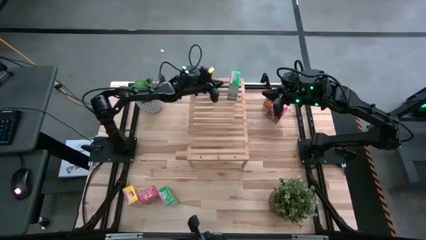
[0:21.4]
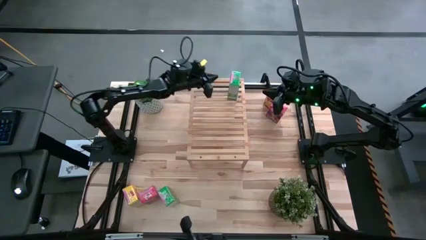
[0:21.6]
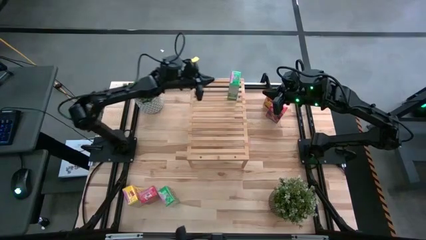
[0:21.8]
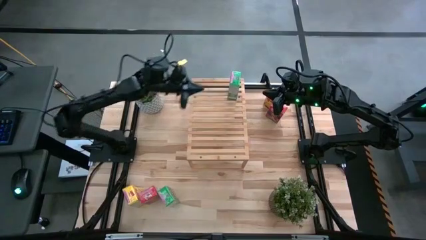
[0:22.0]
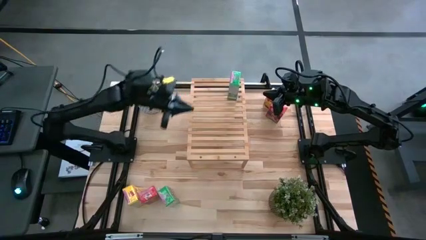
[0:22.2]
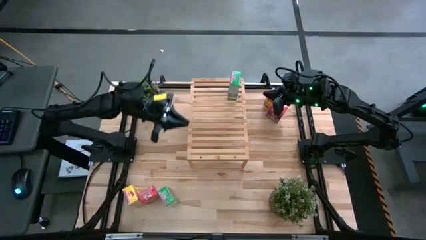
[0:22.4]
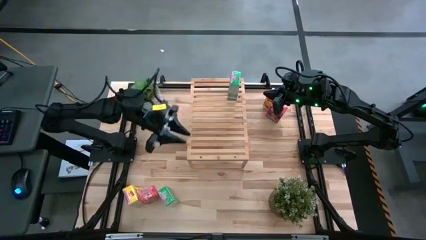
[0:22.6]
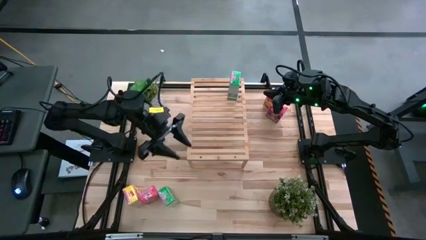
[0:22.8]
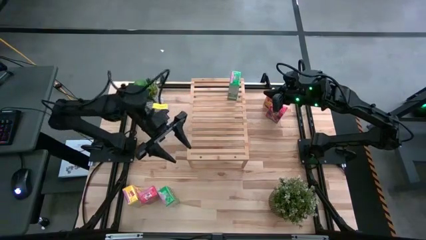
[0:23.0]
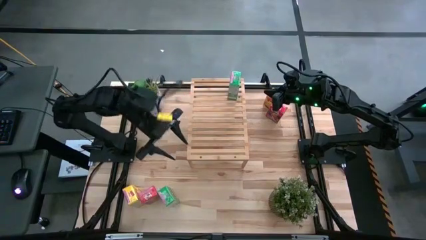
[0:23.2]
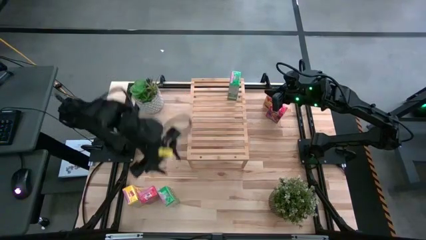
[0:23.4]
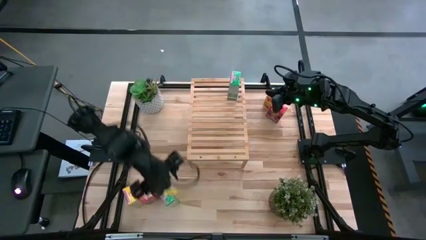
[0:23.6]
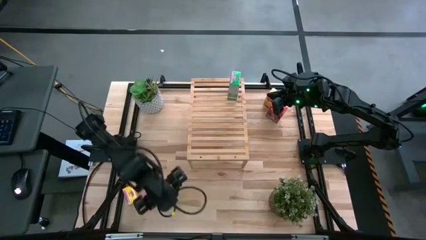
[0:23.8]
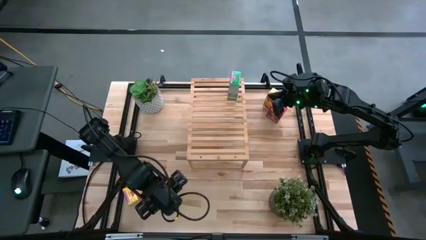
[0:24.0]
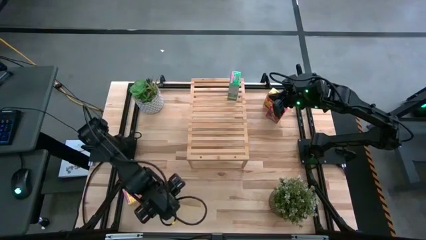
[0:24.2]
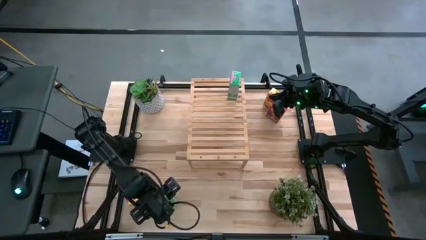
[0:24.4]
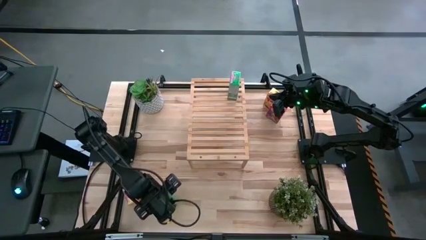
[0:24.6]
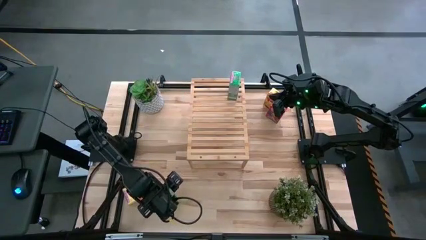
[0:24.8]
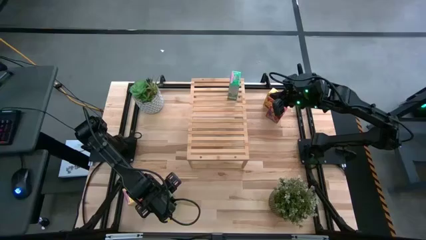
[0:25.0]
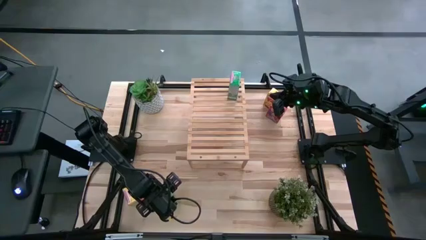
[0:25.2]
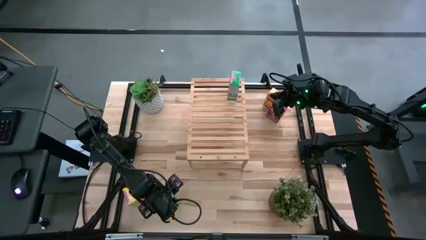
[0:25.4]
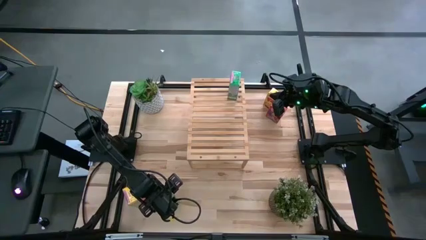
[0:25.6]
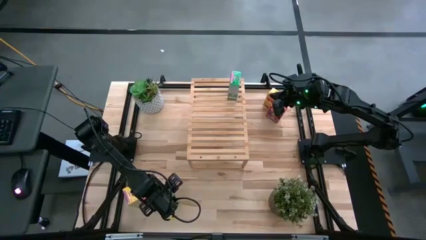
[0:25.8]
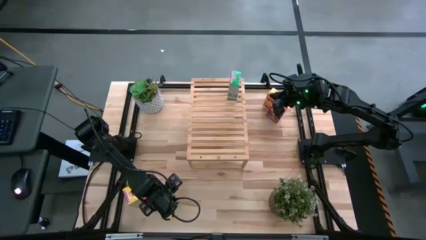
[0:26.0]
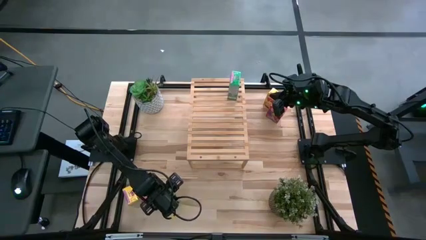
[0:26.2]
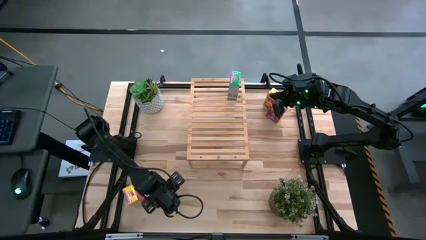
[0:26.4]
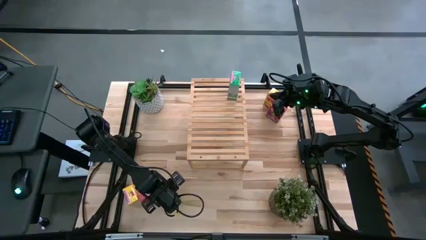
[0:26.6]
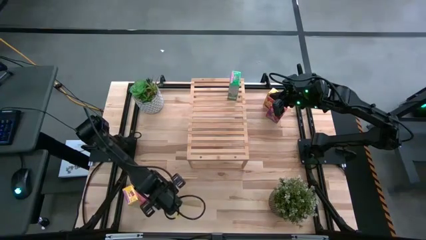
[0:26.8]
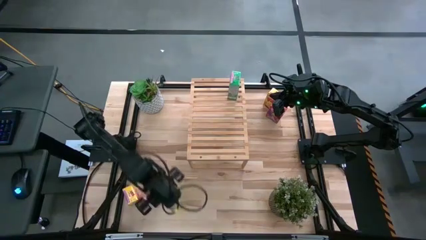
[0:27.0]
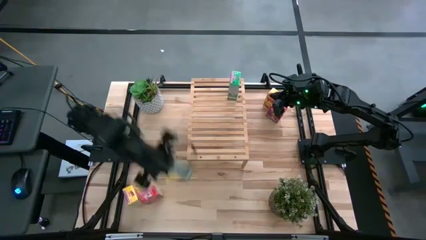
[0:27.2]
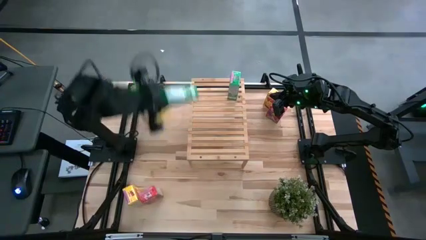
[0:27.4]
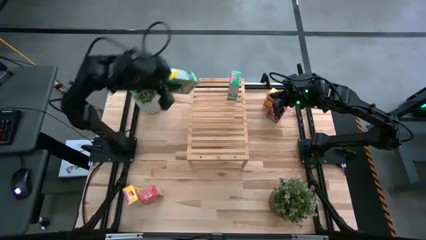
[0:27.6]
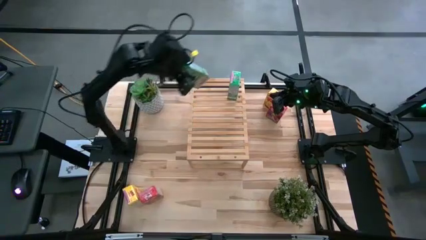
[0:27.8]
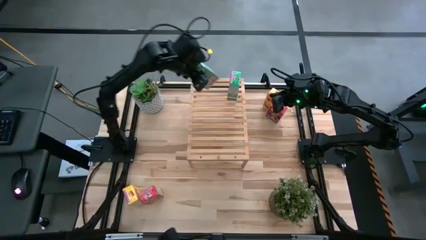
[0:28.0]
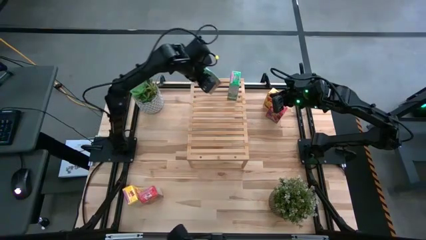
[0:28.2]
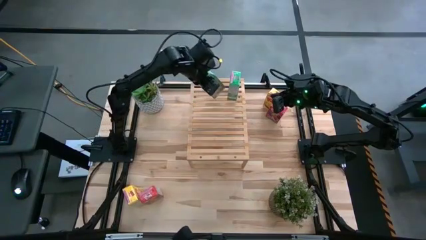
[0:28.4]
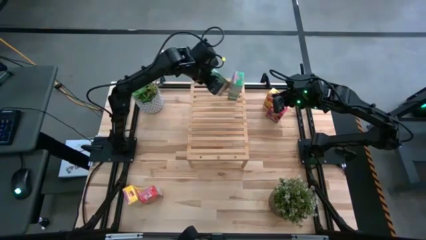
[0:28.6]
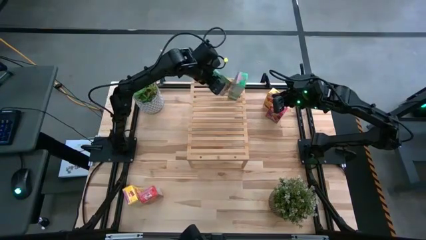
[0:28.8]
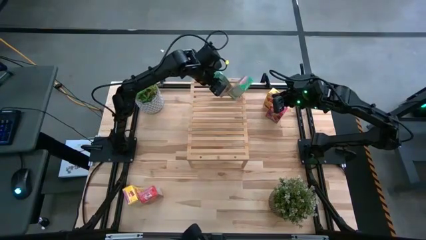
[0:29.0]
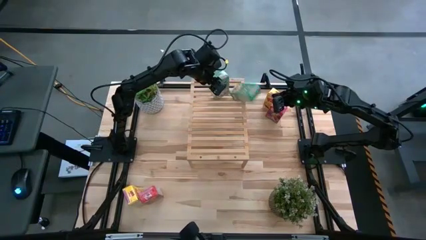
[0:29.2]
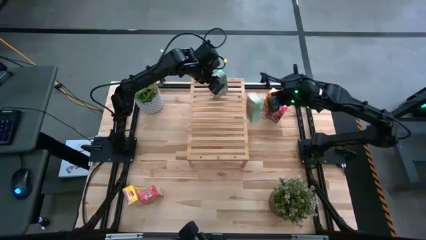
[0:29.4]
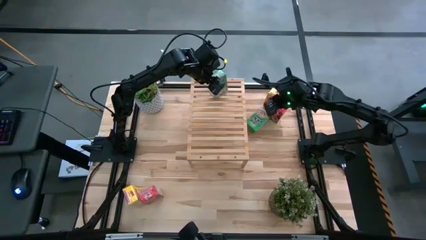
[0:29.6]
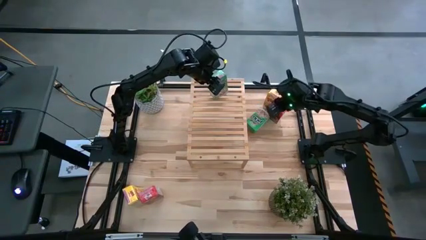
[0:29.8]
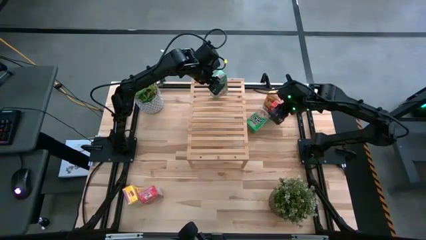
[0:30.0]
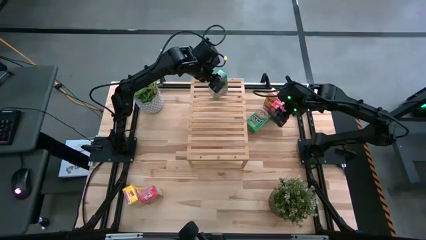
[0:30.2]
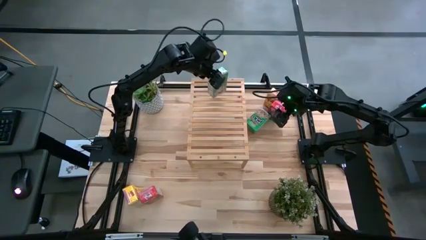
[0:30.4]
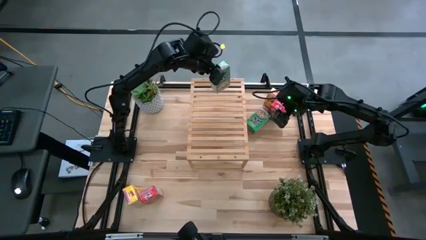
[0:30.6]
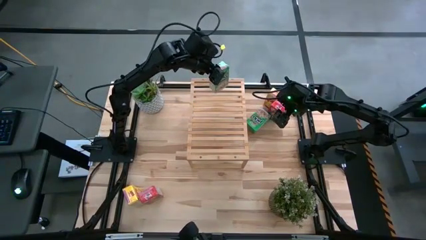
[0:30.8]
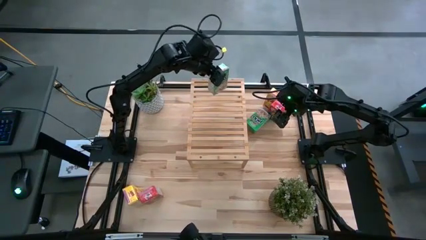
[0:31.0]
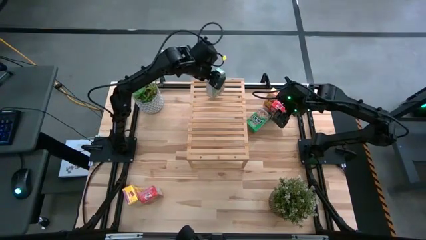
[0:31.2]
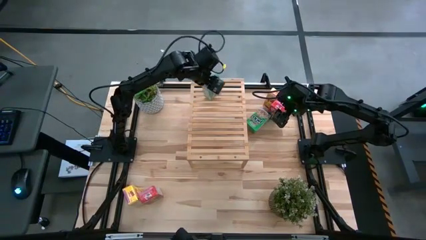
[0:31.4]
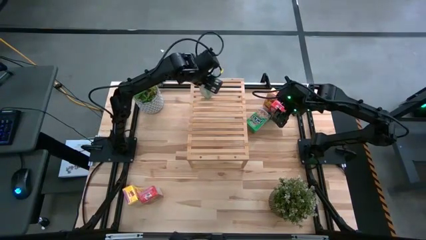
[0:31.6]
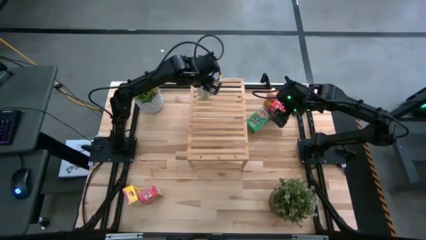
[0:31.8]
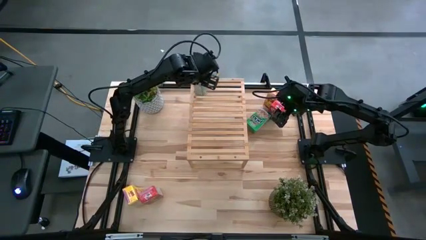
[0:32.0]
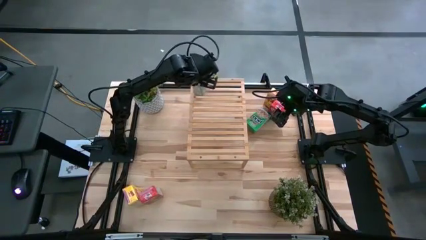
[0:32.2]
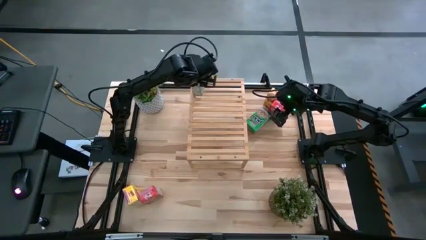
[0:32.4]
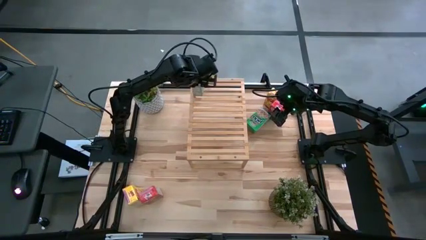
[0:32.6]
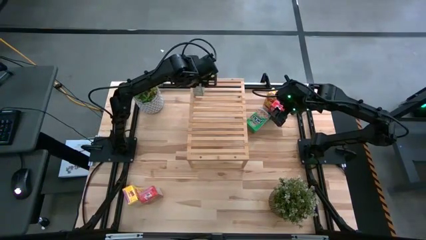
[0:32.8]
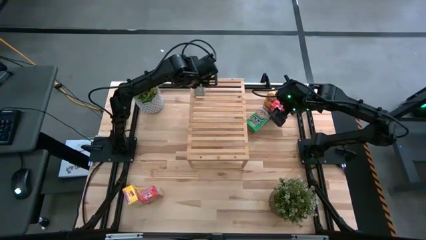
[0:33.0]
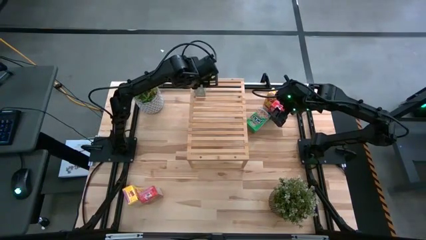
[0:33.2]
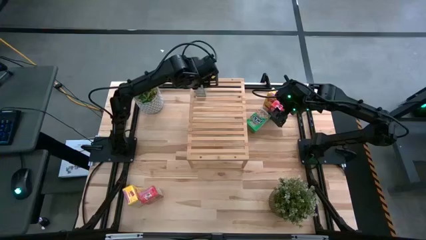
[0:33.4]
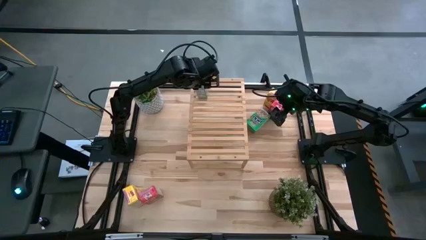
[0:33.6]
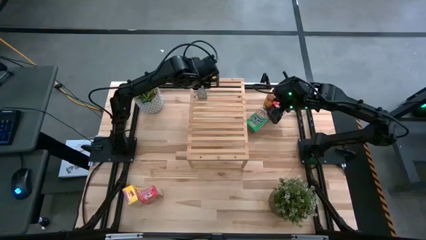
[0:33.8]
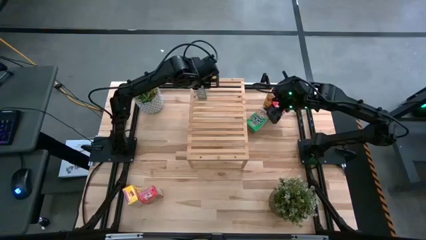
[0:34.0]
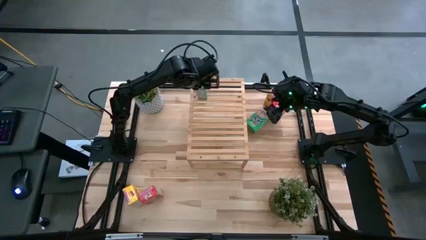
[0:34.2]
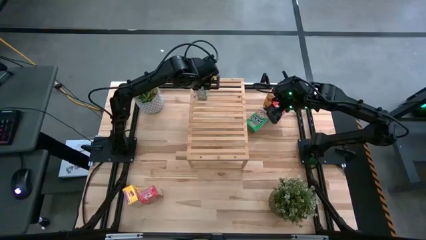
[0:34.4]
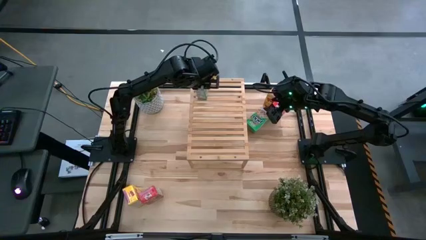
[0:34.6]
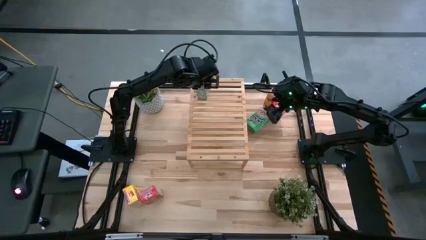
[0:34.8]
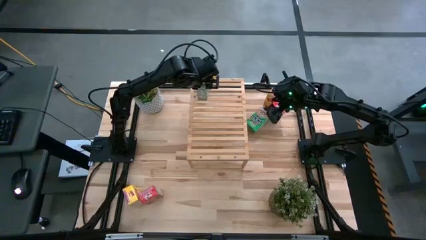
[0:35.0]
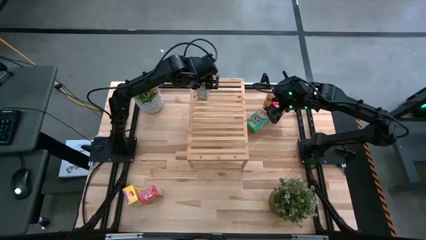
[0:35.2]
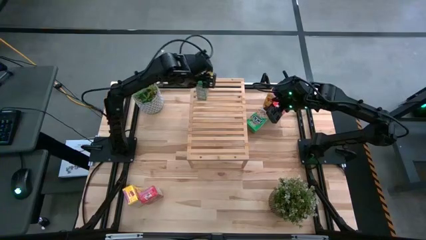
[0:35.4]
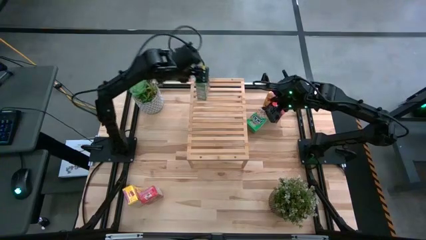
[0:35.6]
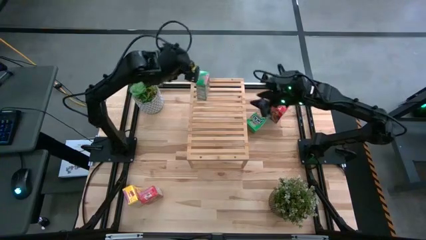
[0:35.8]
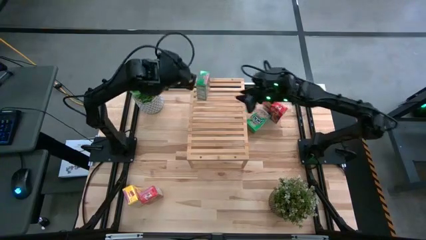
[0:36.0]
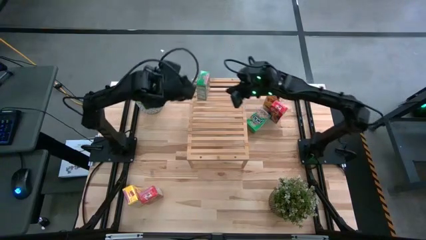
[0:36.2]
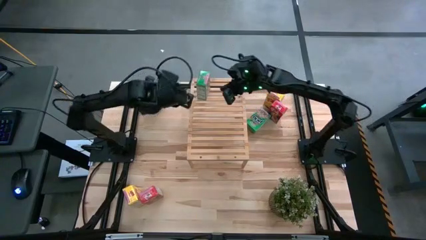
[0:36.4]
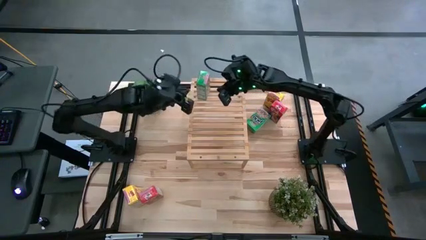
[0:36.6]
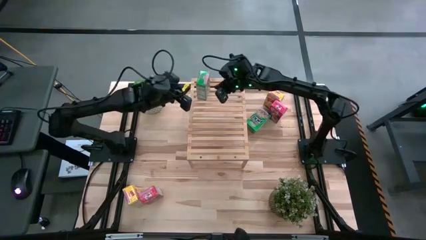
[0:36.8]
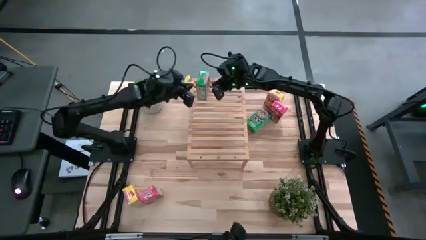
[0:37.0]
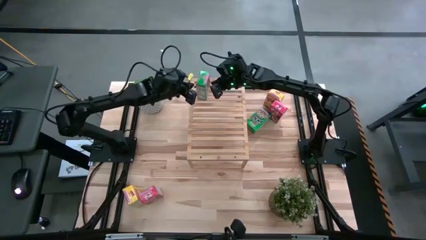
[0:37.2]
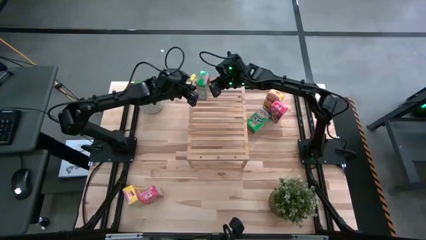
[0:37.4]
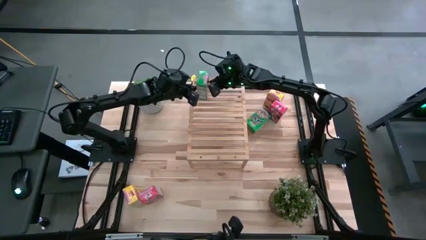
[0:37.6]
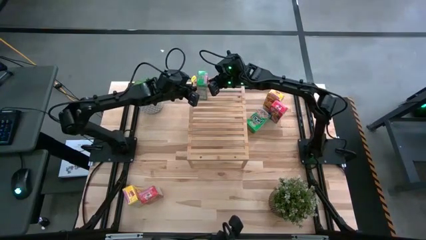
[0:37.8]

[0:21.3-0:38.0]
Task: Stack cereal on shelf
Put the bottom left green cereal box on the shelf and align with the other green cereal box
